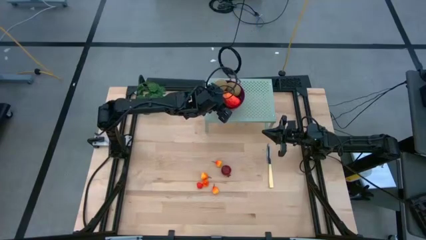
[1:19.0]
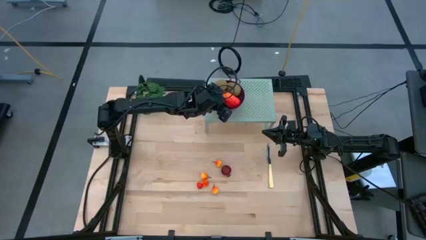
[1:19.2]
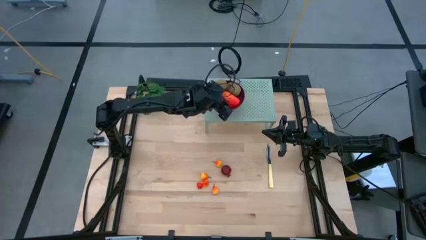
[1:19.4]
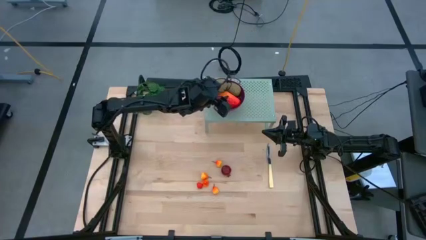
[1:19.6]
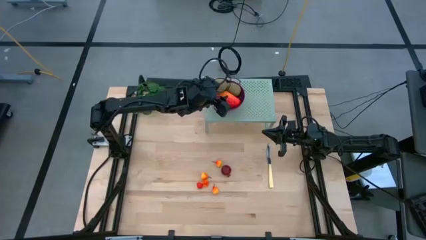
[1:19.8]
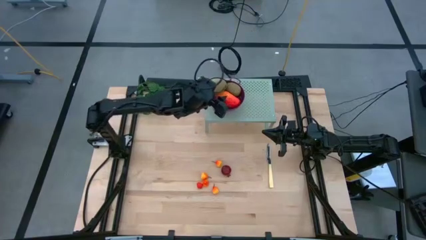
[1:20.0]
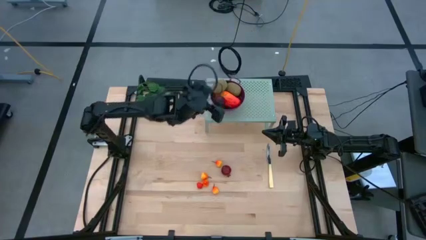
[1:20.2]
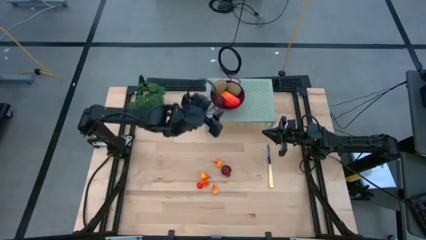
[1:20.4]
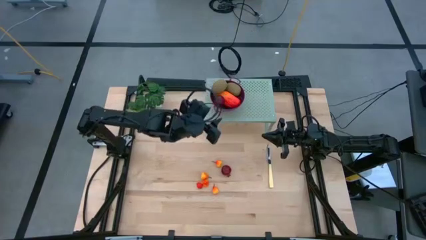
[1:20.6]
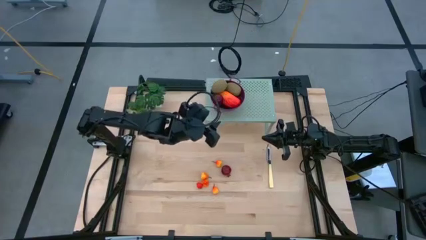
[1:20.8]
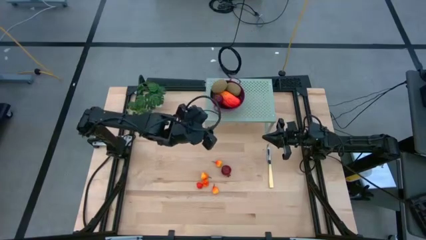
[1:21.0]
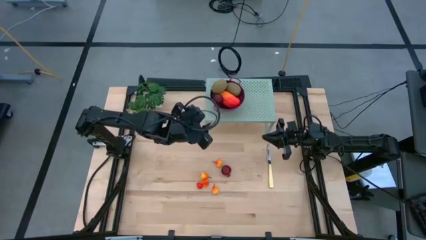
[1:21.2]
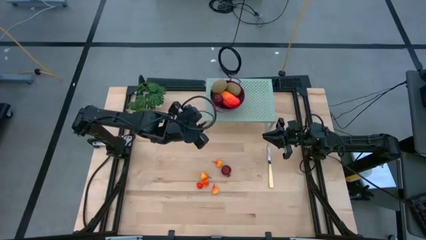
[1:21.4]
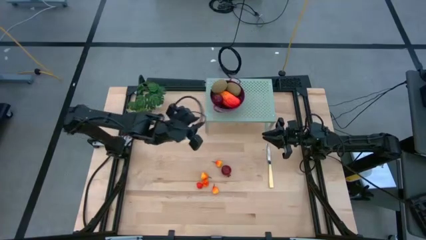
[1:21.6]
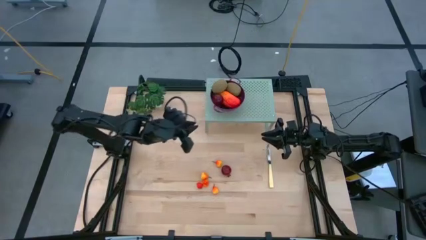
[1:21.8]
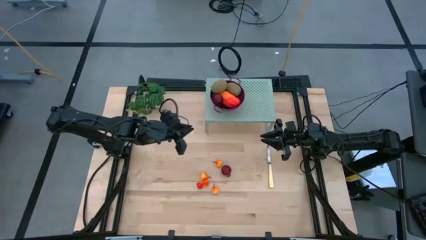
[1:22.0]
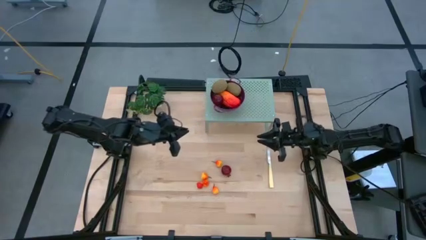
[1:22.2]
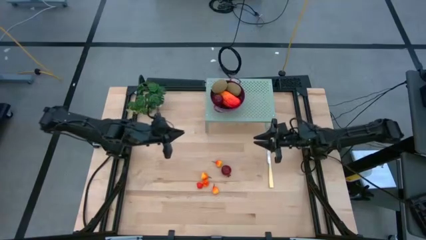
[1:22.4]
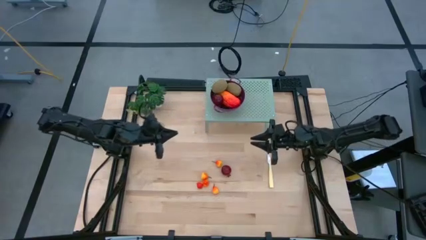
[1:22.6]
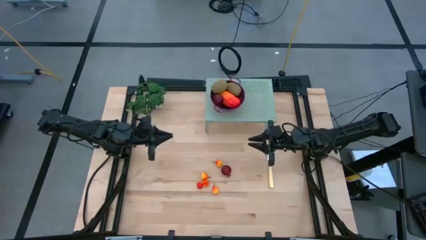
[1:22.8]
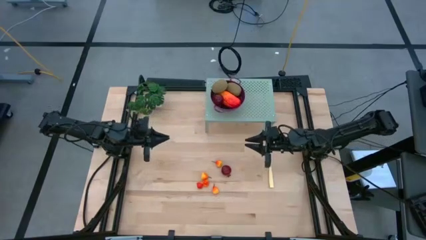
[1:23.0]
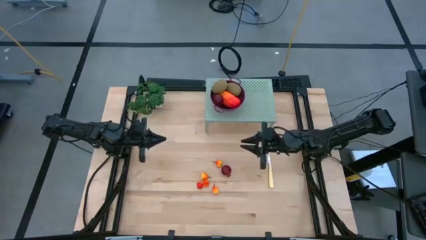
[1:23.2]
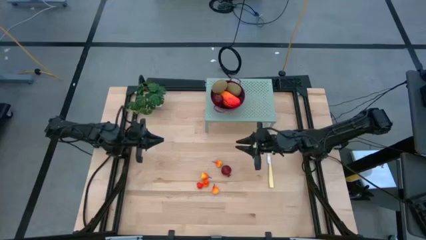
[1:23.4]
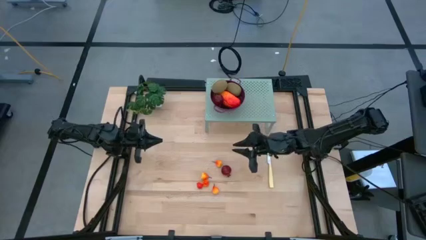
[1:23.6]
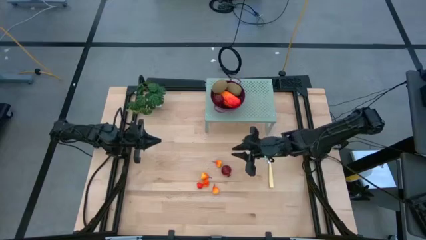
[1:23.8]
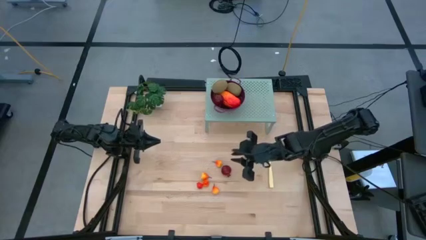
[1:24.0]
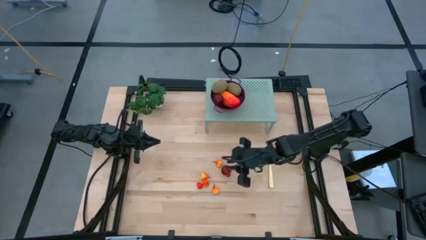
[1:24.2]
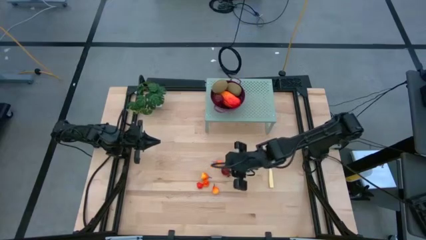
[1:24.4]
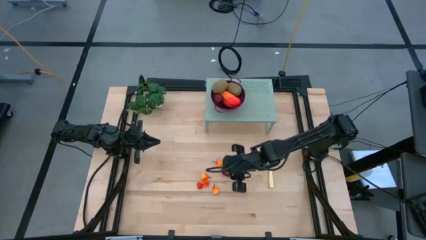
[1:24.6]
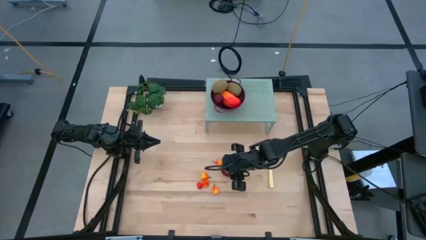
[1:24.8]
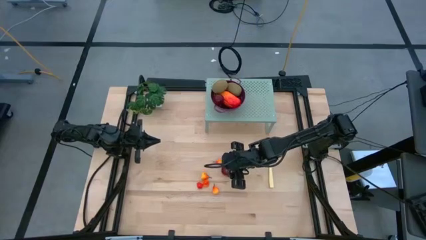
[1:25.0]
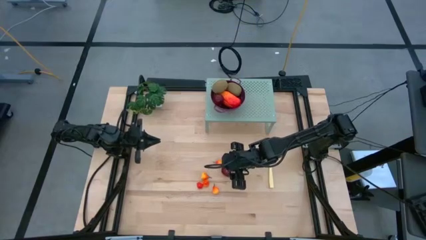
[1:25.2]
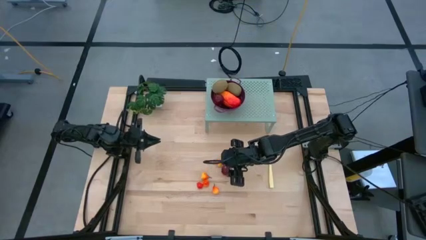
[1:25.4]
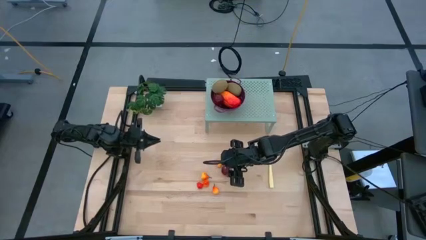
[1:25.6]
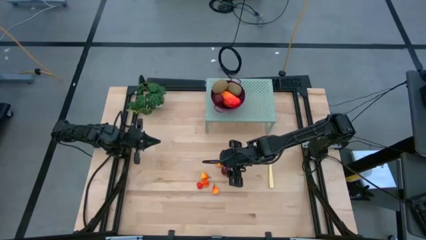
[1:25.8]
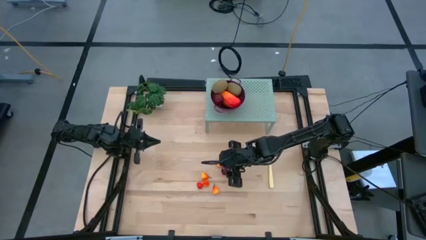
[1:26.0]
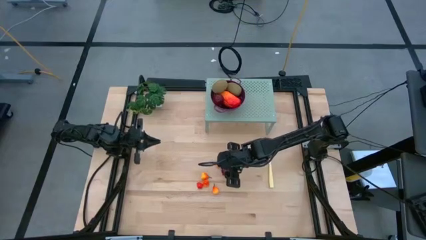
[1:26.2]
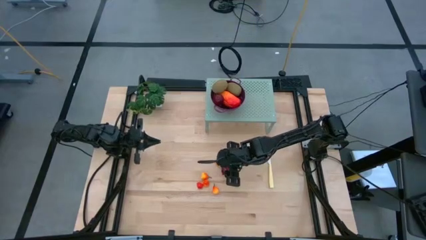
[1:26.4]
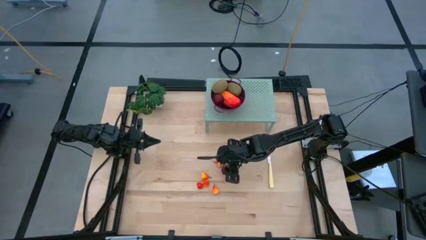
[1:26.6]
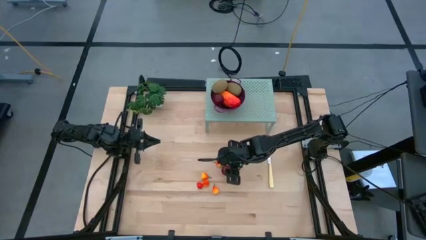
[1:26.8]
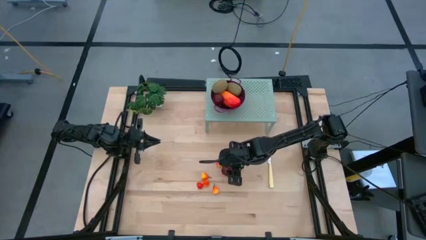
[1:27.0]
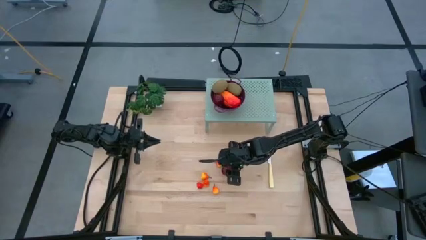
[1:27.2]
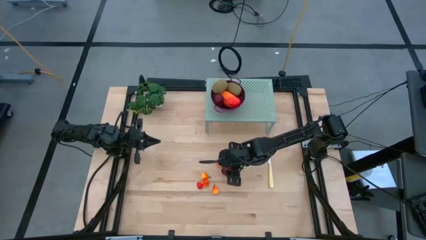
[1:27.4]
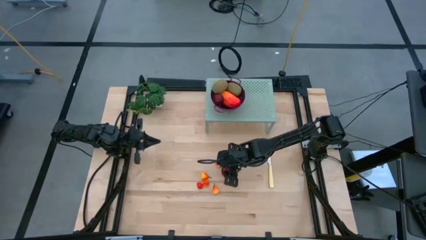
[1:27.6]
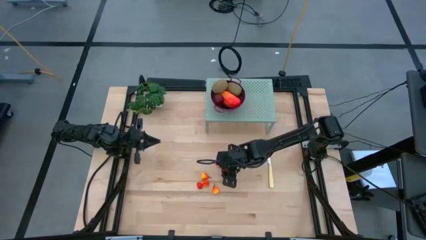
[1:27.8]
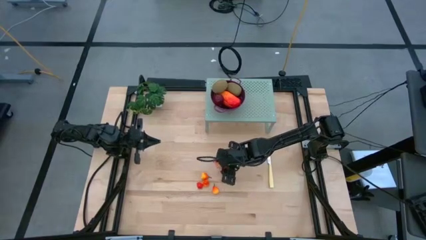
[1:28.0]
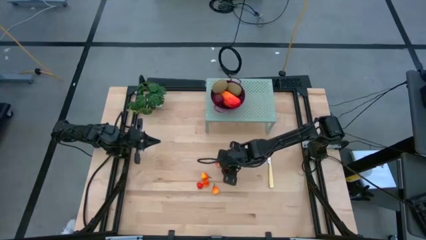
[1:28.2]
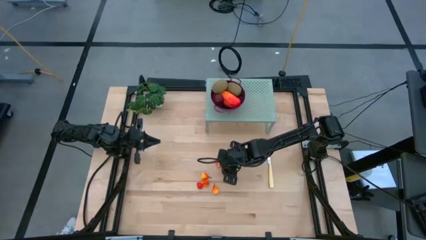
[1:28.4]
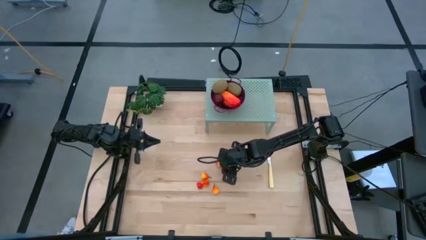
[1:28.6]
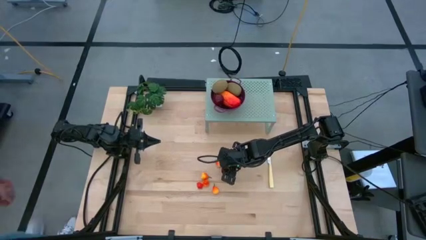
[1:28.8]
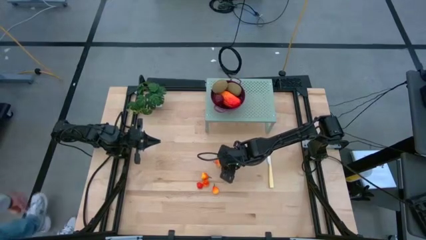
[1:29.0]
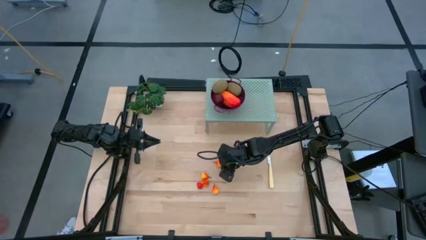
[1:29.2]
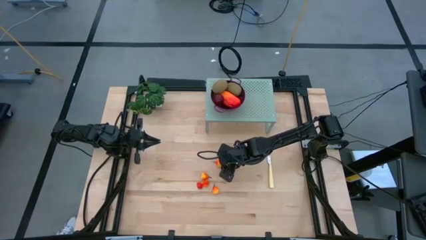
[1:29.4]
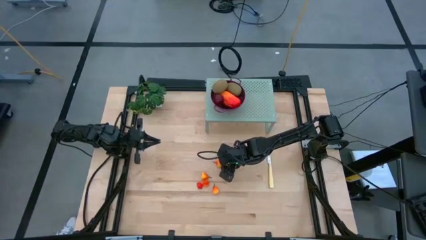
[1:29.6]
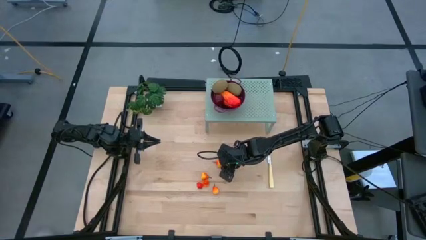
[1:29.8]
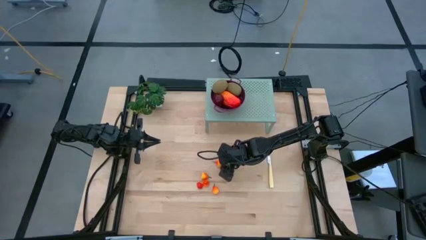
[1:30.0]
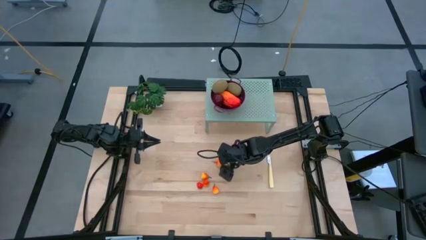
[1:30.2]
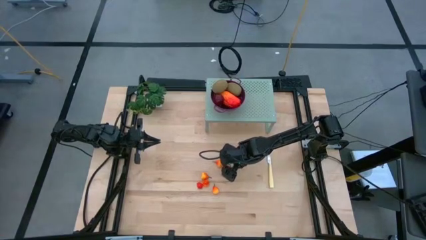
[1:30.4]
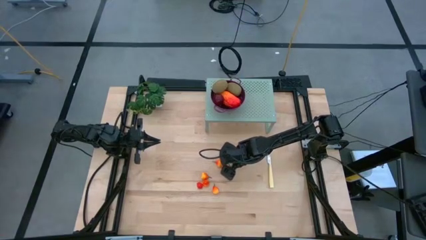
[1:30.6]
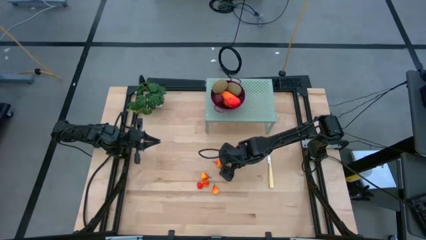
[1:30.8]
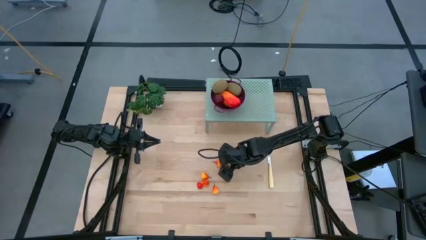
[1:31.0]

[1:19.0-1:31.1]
Task: Pick & Place Fruit
Put the pomegranate into the dark red colander on the shelf
